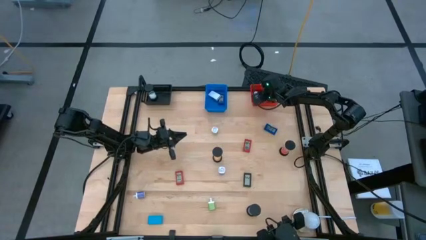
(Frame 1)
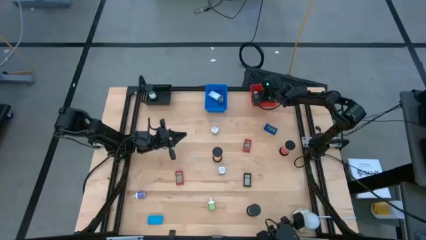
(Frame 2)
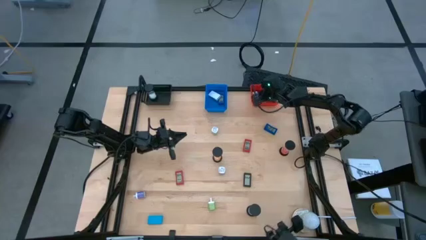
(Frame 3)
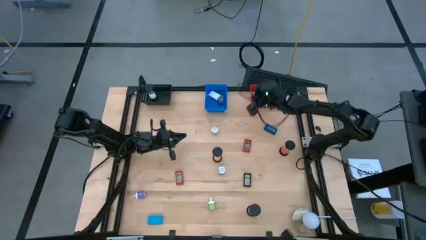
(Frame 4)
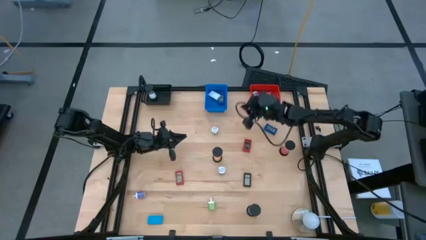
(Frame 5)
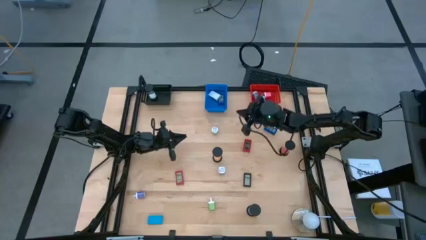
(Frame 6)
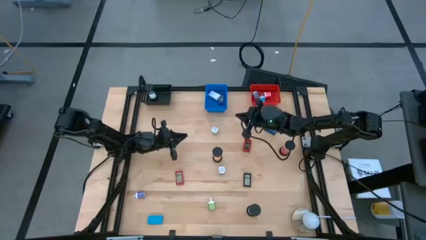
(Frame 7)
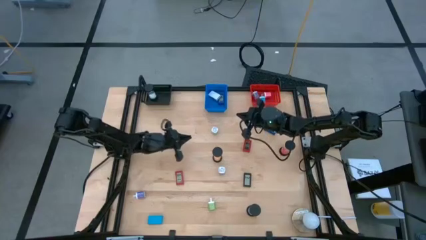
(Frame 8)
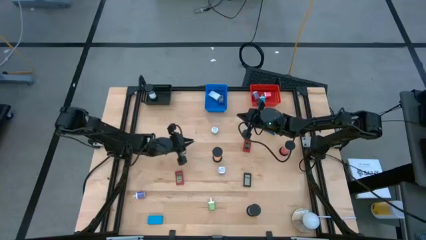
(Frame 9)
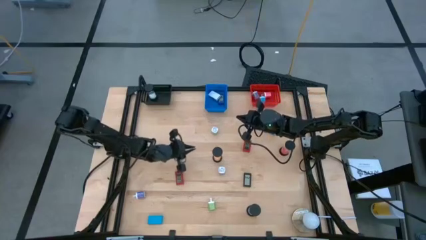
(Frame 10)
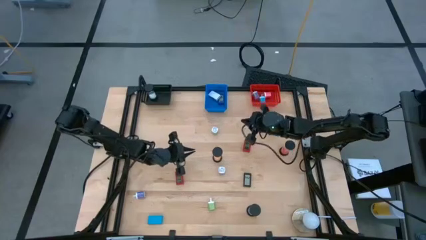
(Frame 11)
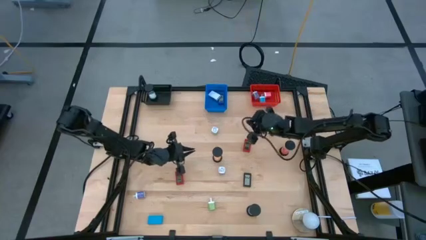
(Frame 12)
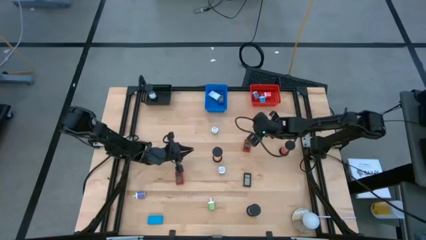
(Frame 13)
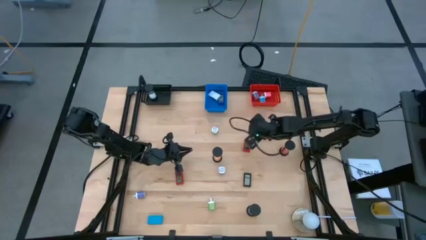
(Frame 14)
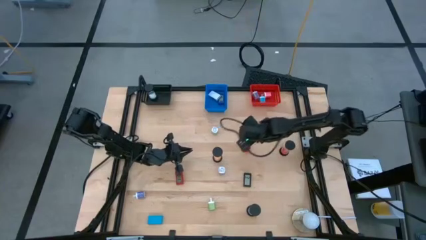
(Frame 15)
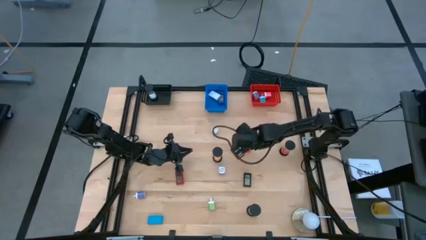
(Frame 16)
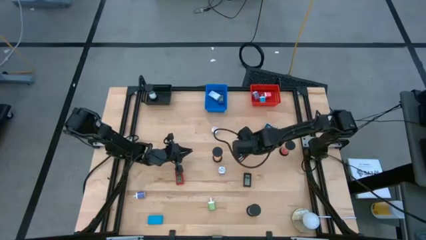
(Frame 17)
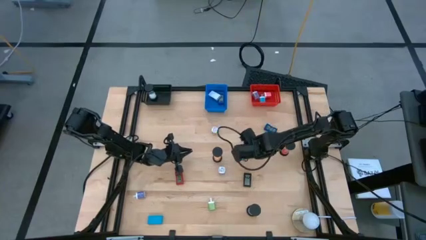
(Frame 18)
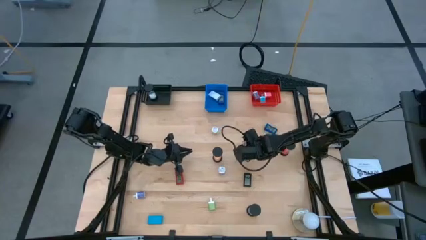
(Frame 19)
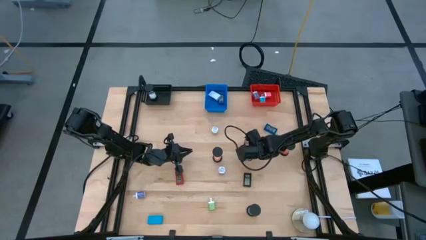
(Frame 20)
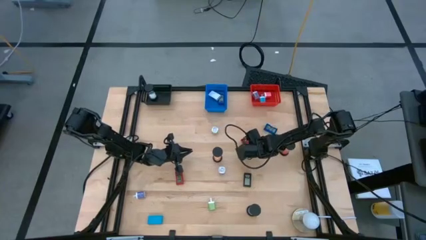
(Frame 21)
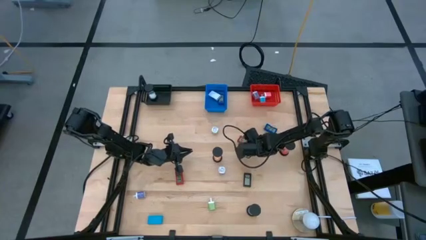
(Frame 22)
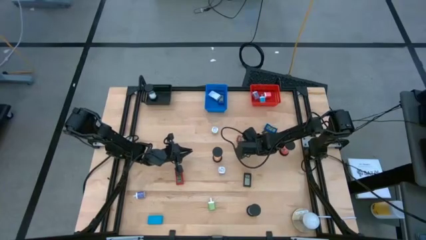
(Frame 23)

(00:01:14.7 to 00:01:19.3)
Task: Pick & Place Office items
Put the right red digital clock into the blue basket

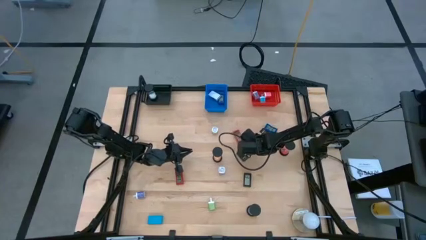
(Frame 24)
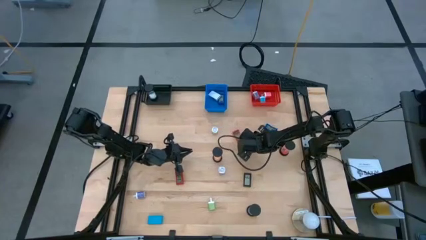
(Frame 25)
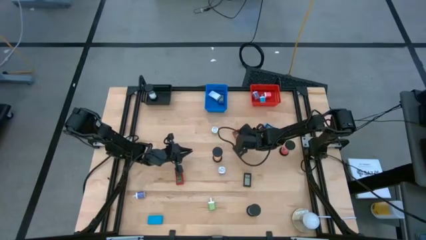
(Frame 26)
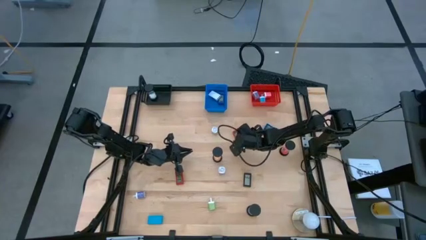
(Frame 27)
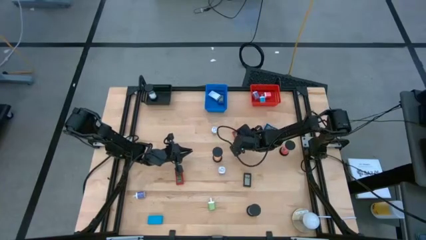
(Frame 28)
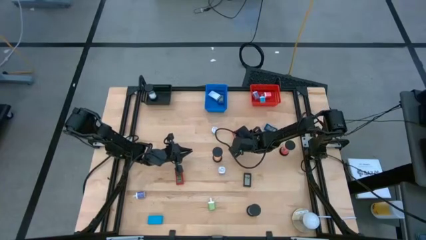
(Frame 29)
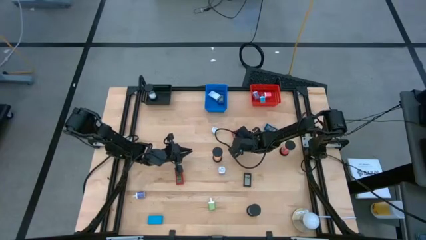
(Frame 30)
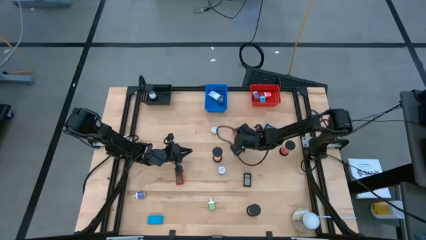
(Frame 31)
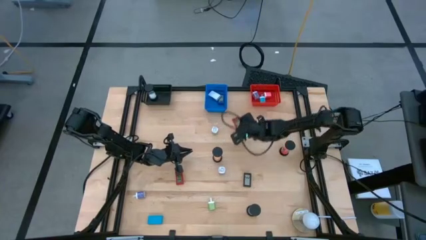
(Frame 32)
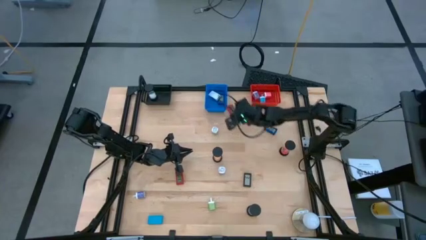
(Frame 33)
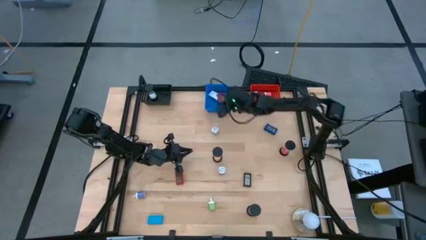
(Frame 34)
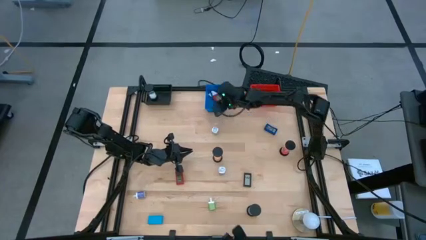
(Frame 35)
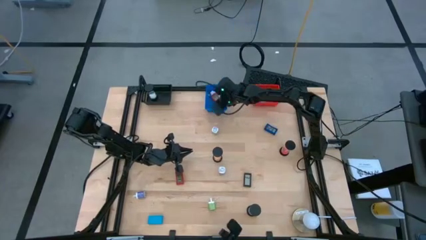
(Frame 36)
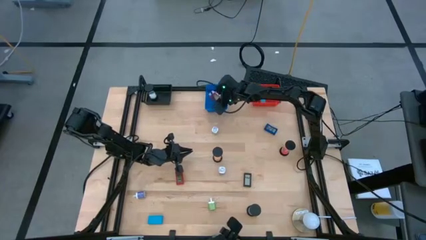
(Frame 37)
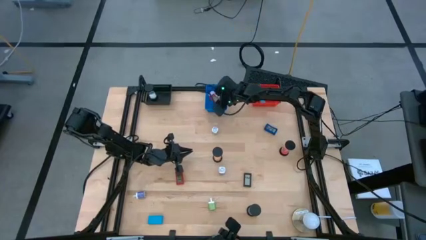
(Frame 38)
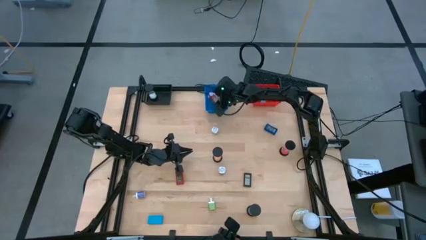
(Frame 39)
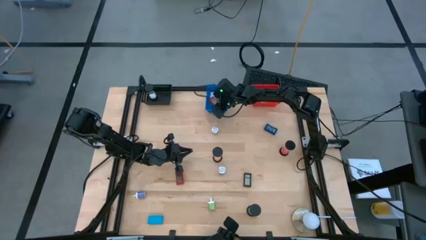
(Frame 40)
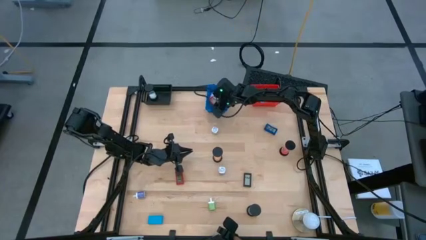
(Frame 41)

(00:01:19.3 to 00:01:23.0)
Put the right red digital clock into the blue basket

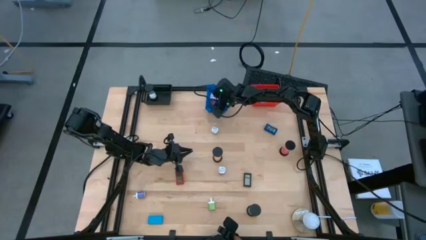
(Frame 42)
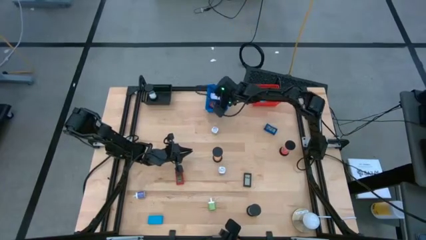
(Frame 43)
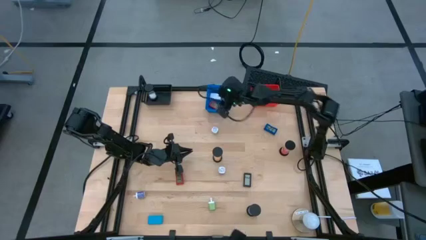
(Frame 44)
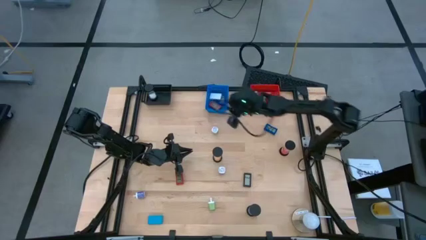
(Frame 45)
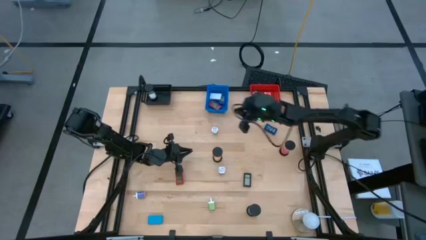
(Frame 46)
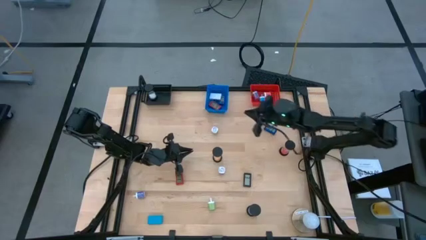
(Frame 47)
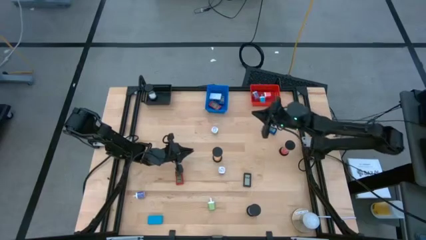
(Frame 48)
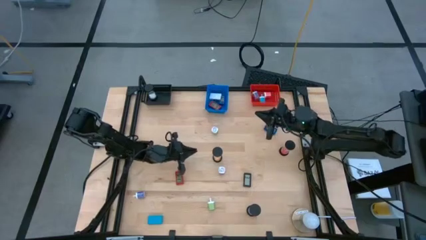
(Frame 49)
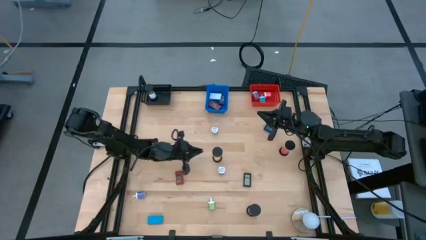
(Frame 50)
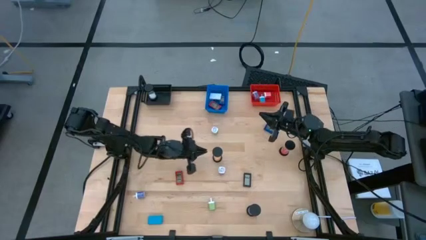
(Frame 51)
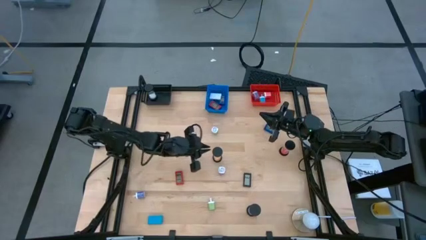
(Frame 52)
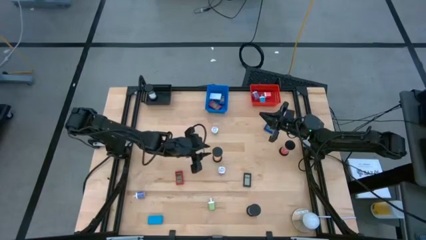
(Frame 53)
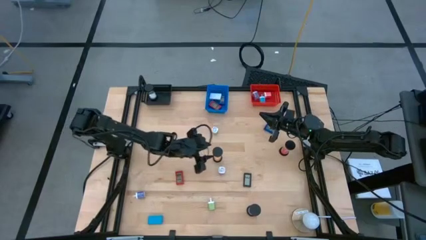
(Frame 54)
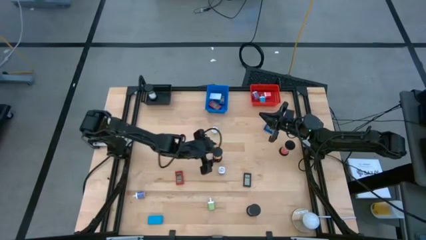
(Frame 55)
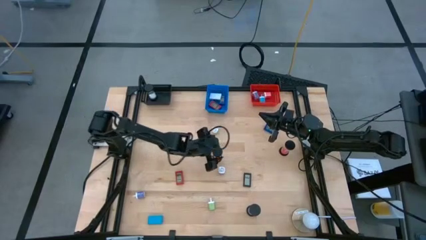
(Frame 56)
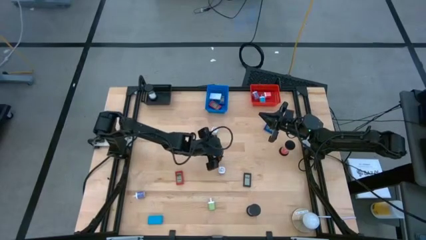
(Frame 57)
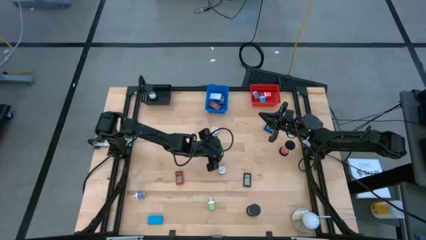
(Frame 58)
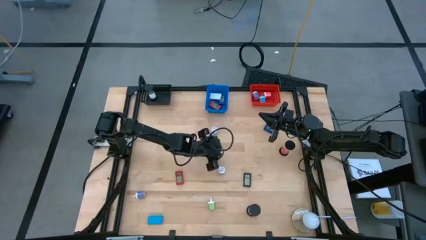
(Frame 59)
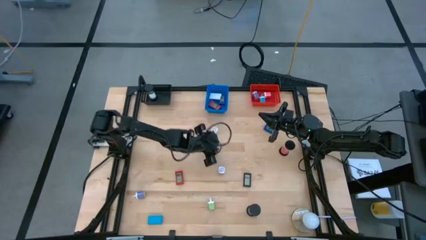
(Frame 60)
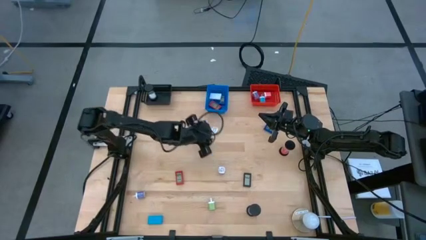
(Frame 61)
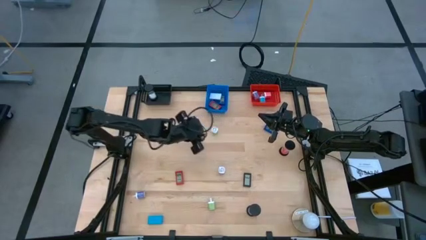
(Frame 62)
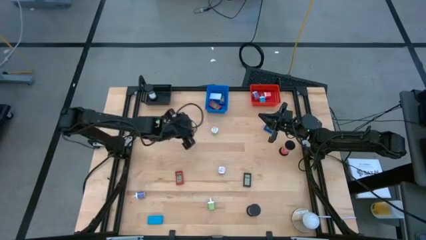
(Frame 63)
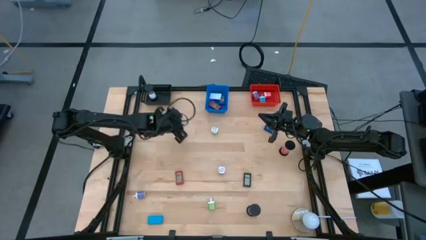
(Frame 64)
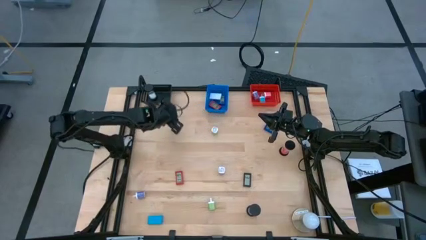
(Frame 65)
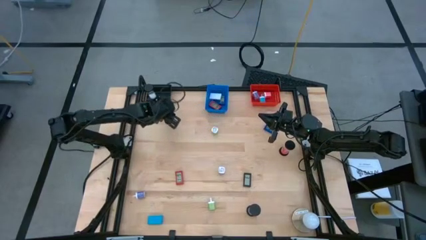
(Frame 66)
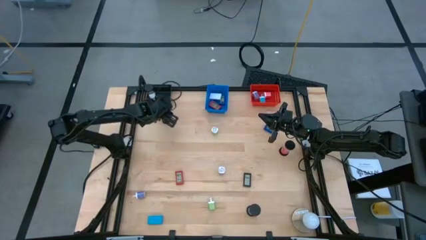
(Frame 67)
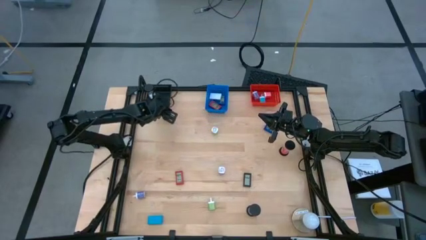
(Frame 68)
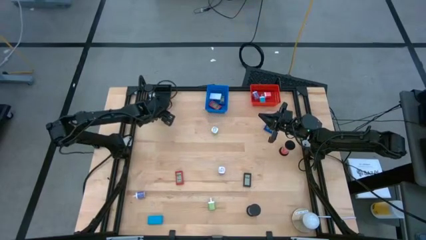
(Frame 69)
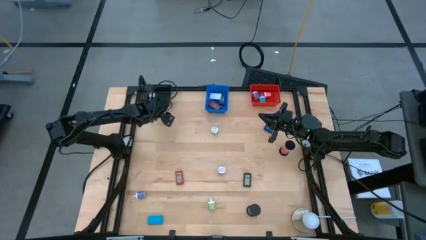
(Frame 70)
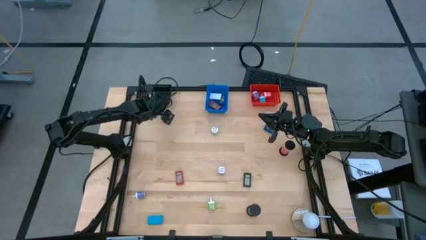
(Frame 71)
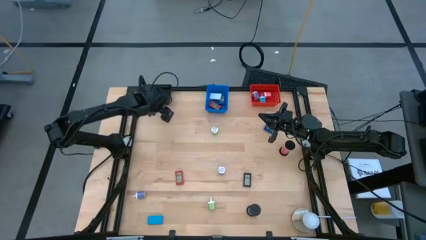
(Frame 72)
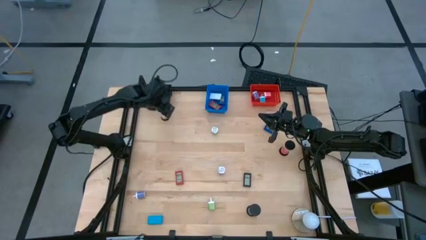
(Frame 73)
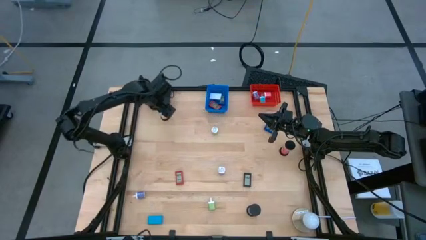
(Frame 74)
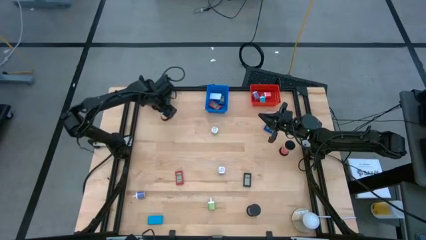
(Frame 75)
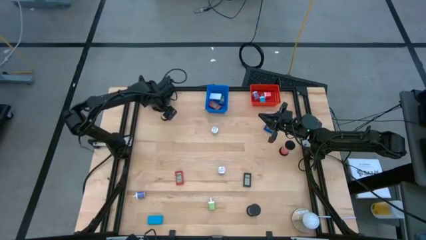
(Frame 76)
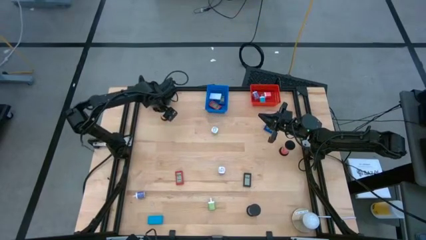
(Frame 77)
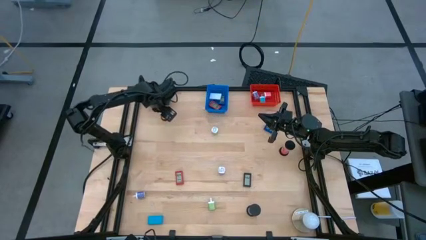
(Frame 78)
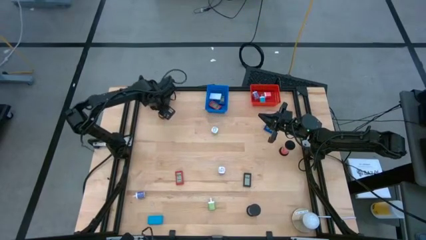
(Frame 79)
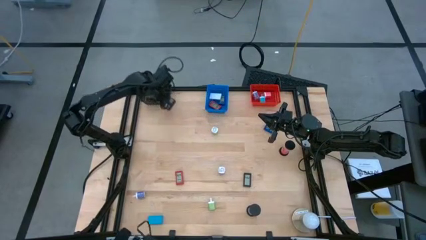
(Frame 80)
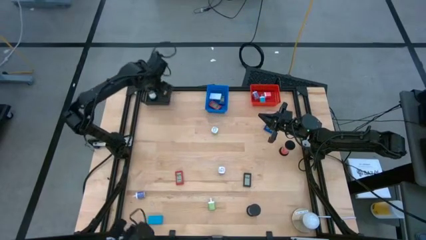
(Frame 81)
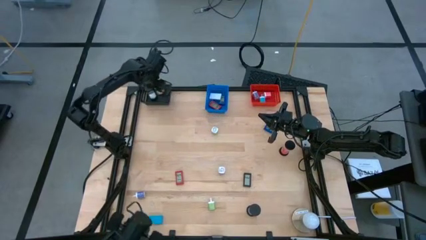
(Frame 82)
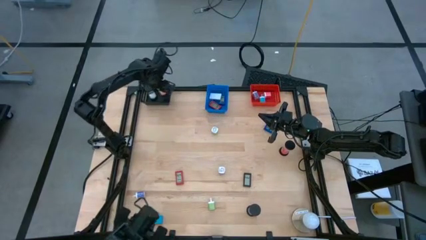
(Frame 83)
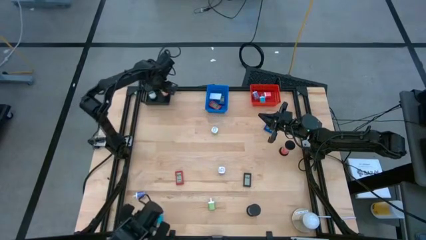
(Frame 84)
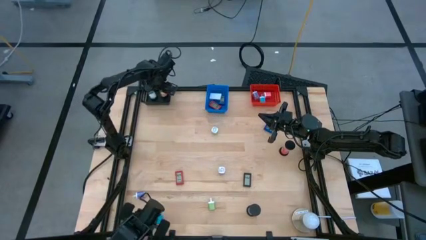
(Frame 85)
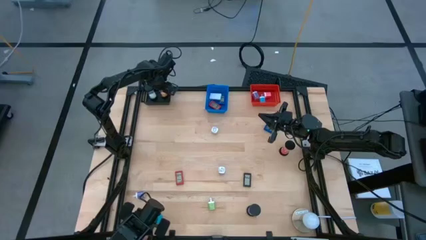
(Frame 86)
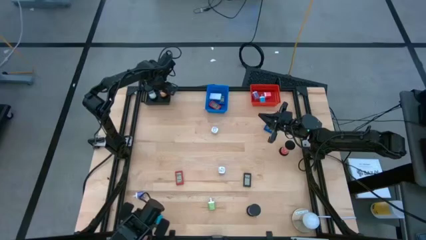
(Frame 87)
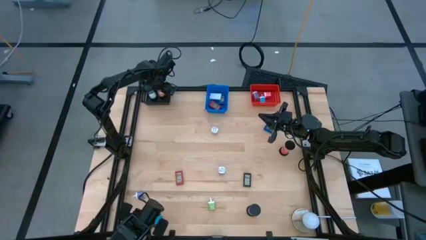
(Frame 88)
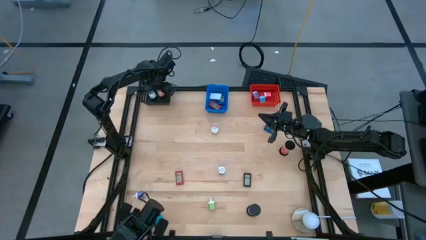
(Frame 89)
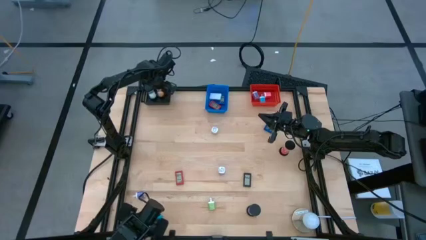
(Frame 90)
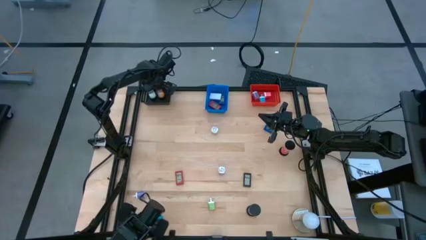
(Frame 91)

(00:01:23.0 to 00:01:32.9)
Put the orange hourglass into the black basket
